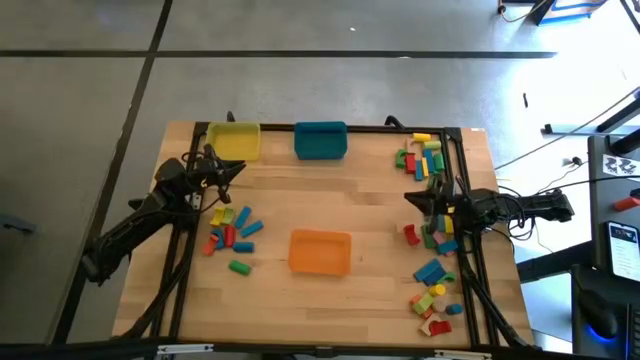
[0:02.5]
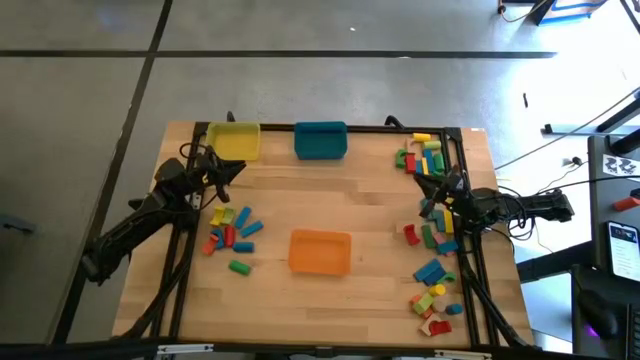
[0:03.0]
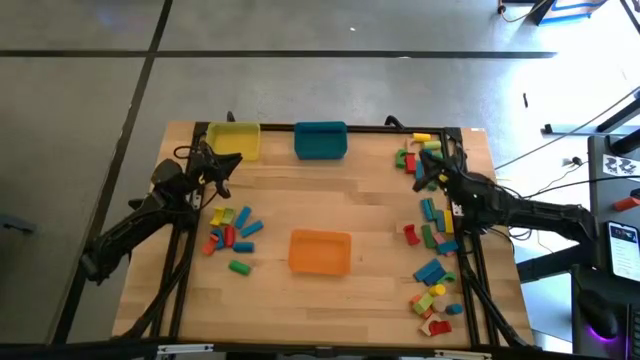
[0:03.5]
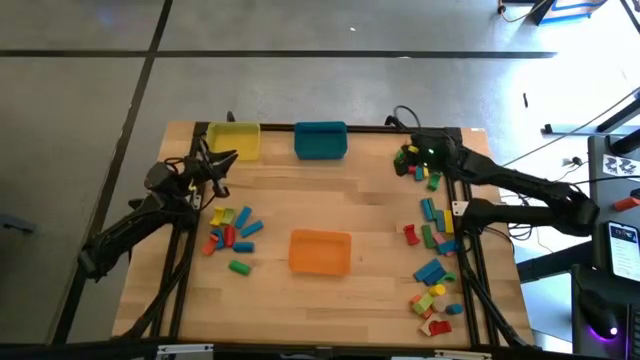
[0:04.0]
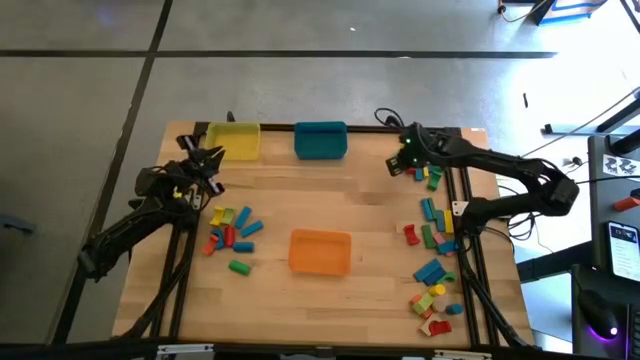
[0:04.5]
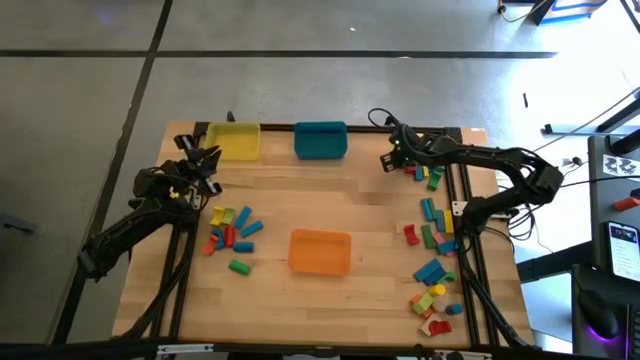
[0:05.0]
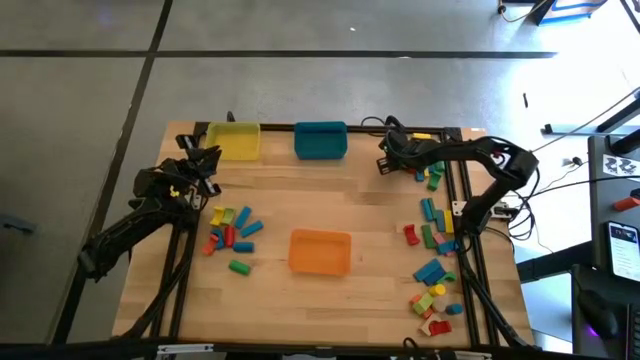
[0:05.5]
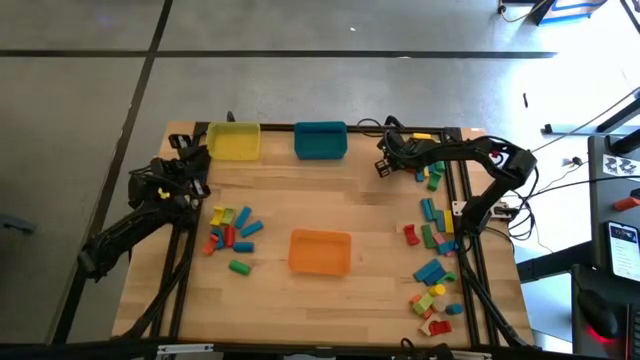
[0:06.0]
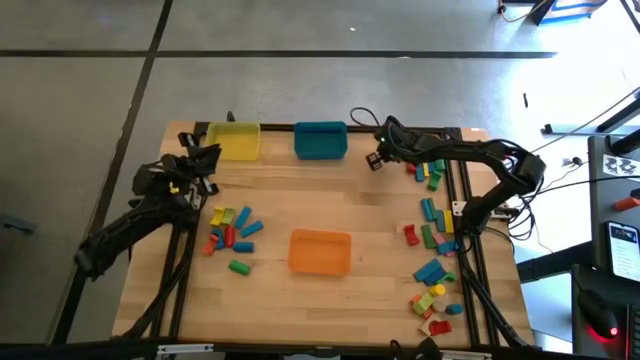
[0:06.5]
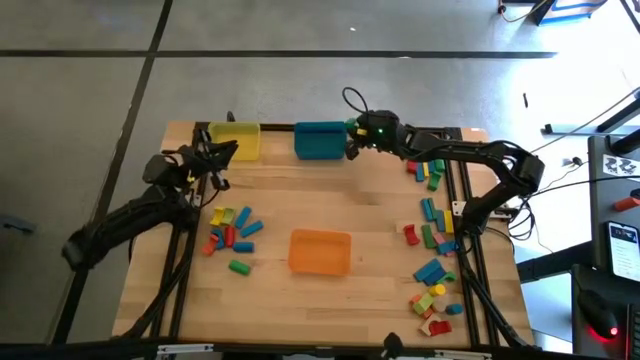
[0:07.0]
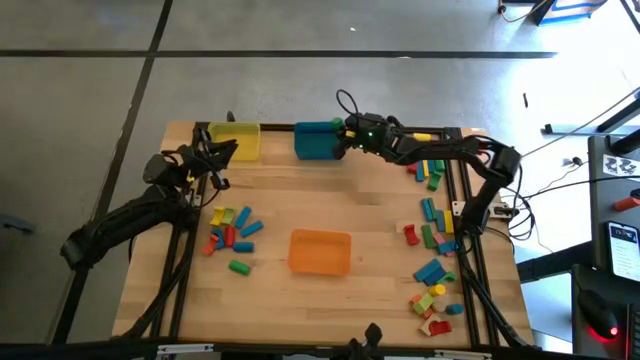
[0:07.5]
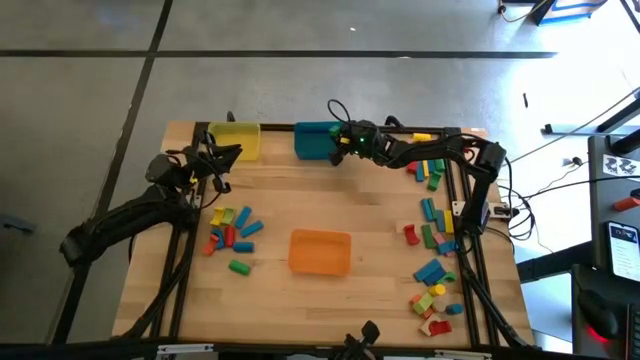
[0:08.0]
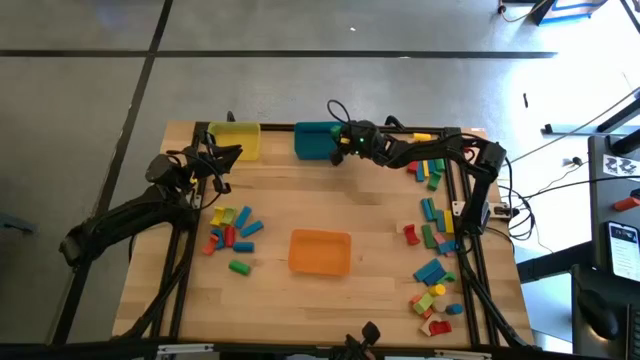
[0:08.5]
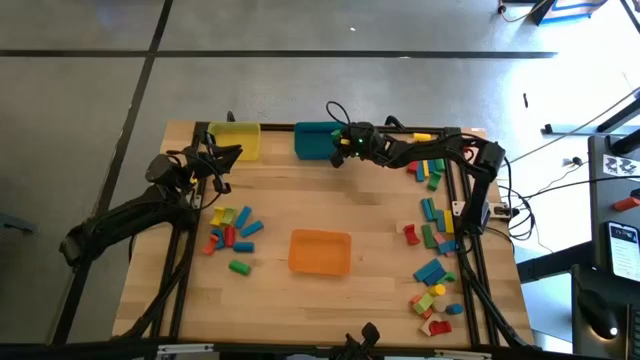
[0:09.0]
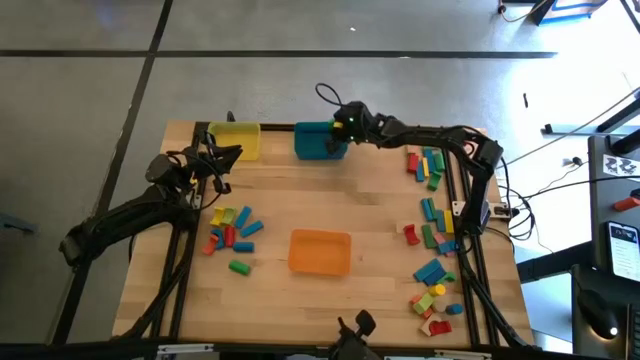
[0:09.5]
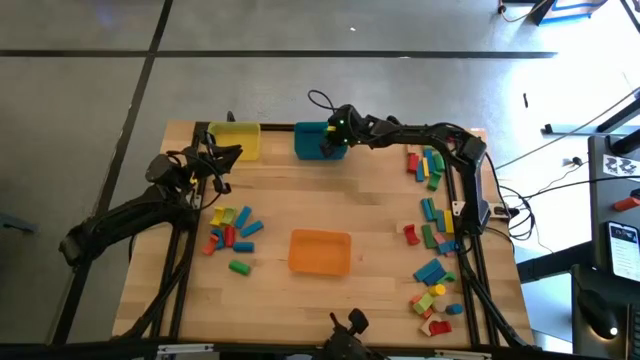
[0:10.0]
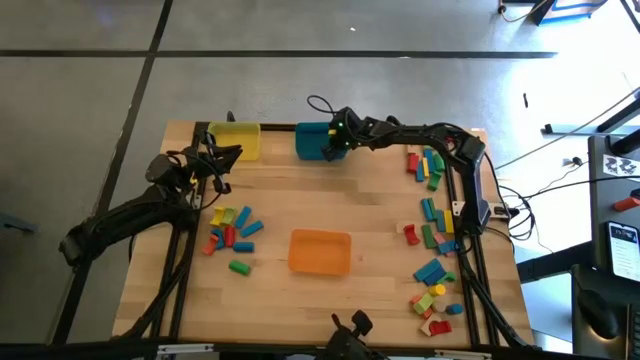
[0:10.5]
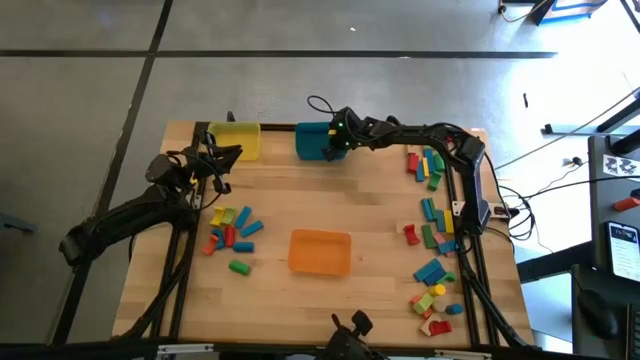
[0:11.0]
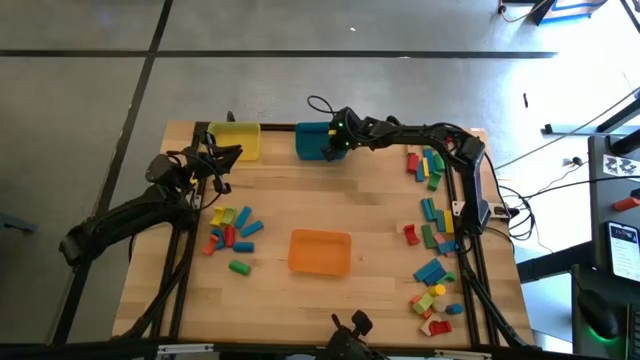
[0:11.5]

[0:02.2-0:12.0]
Task: Sort blocks by size
Put the green arch block into the blue bin

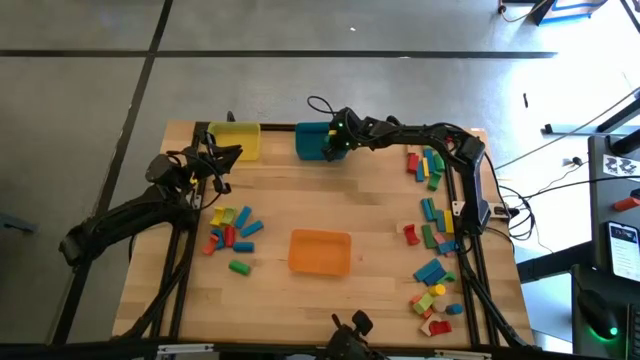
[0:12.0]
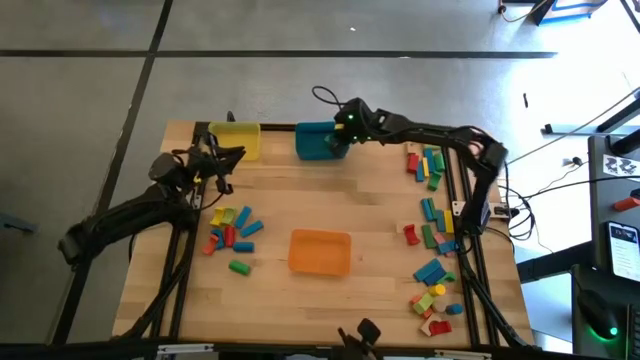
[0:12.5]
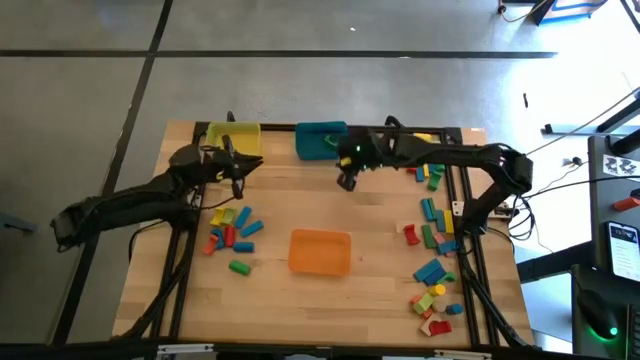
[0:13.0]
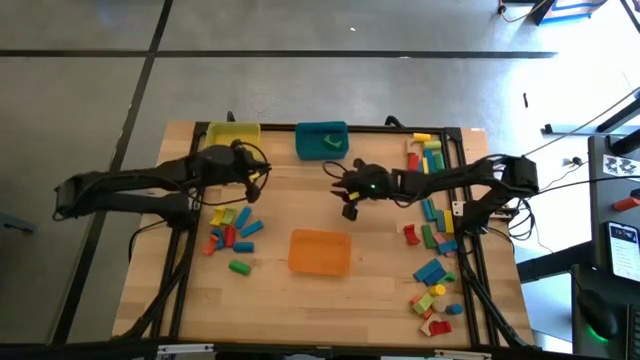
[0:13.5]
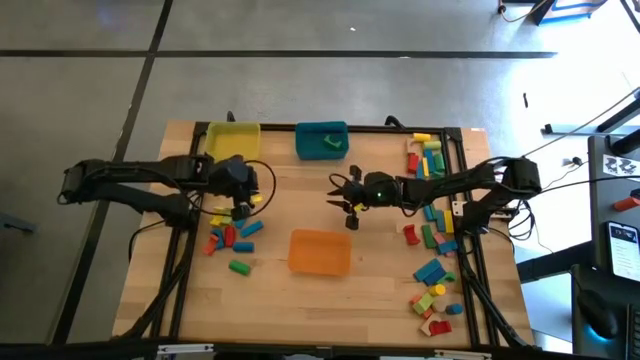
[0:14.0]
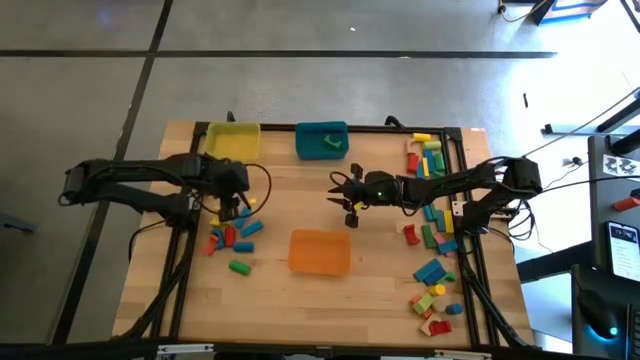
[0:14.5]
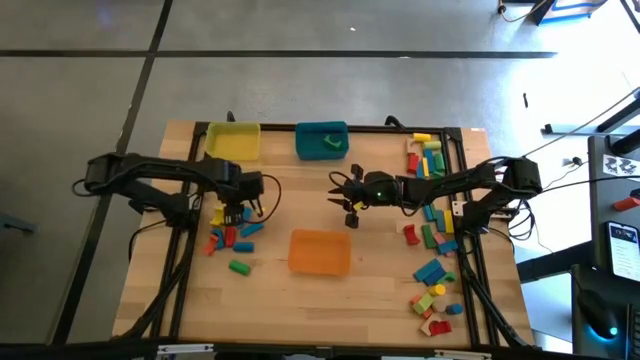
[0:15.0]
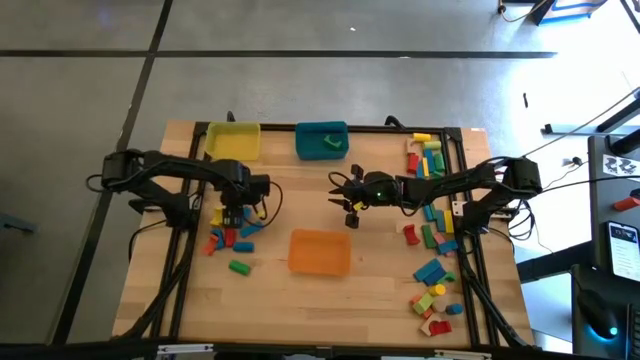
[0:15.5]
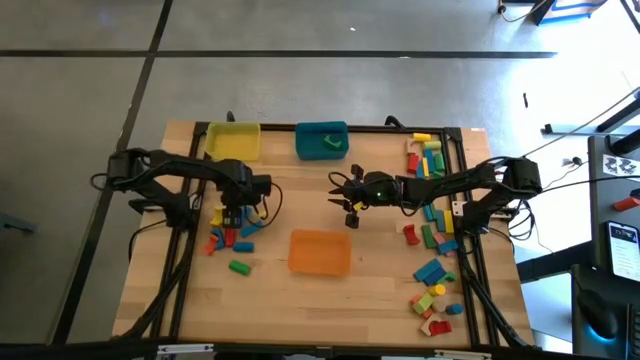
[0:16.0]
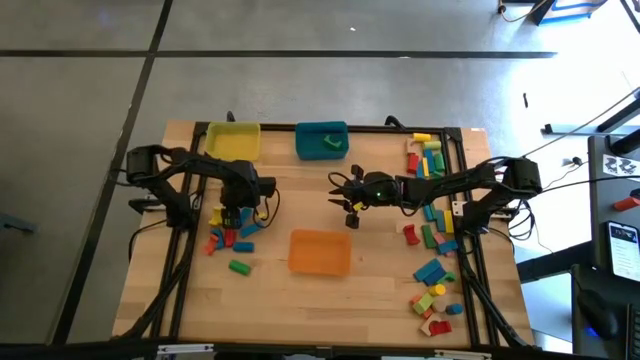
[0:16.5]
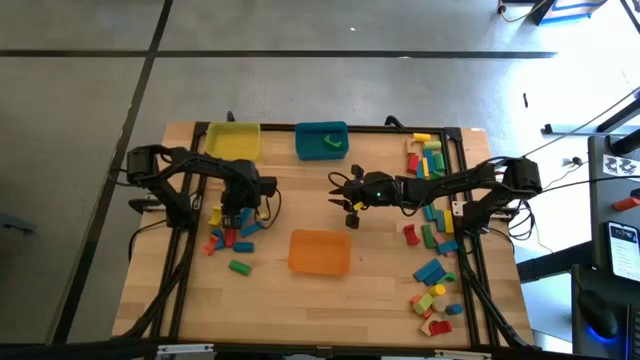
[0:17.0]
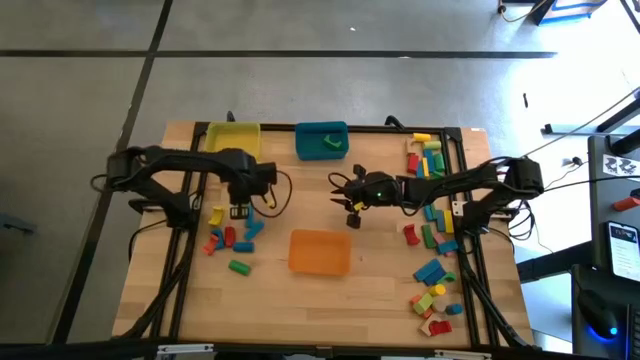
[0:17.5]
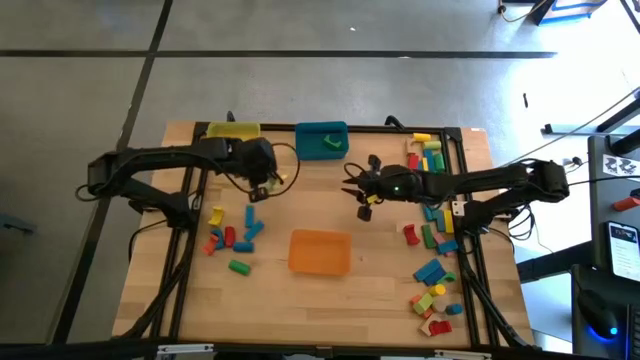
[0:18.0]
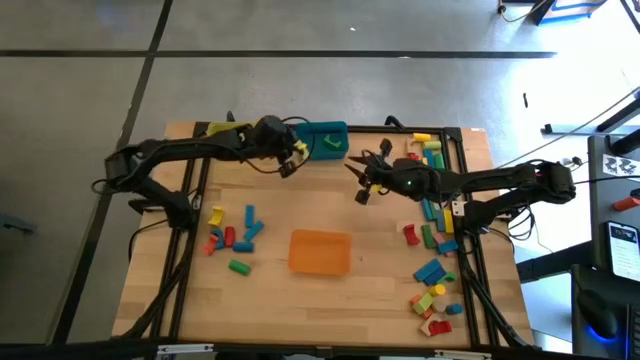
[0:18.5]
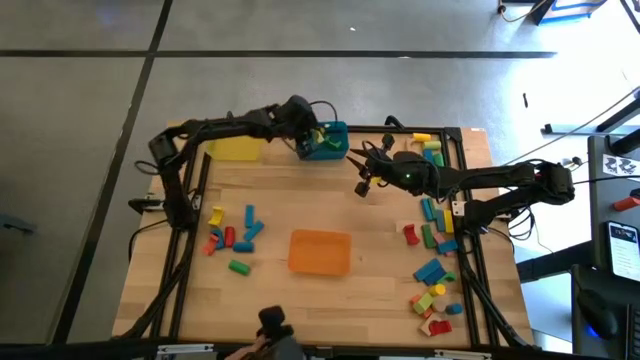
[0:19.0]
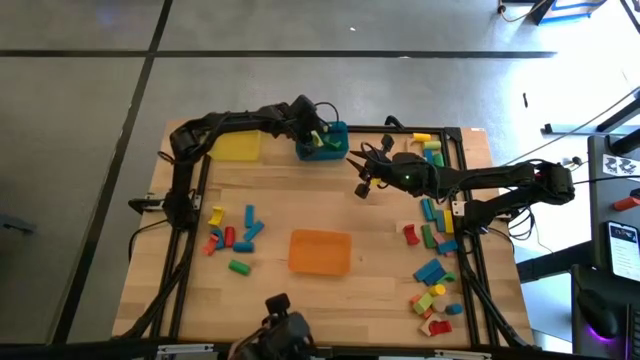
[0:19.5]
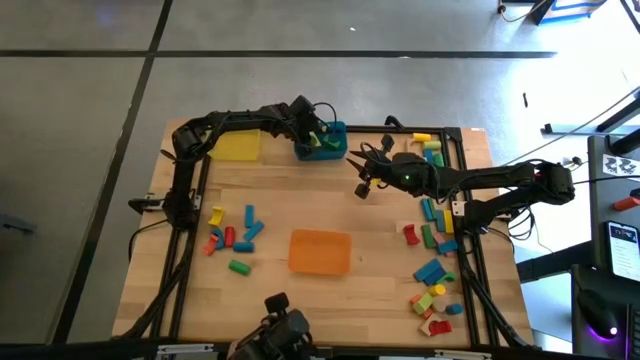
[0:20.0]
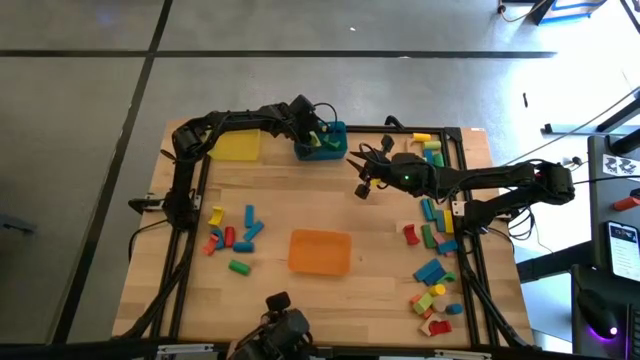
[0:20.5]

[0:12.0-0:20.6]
Put the light green arch block into the blue bin

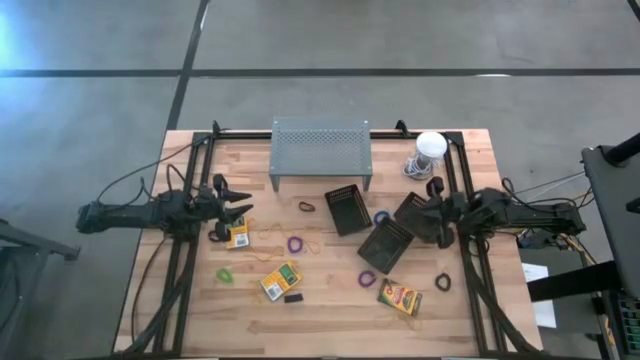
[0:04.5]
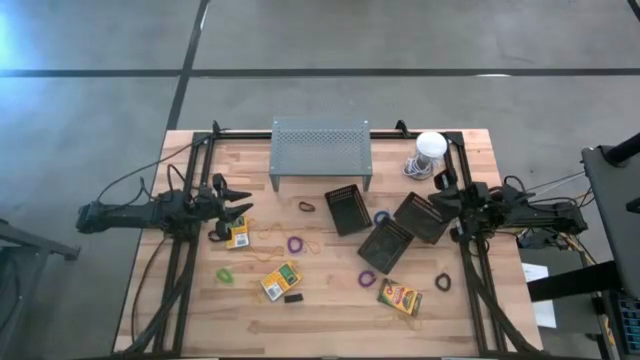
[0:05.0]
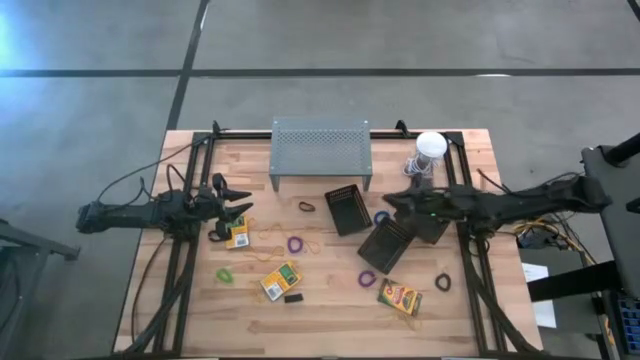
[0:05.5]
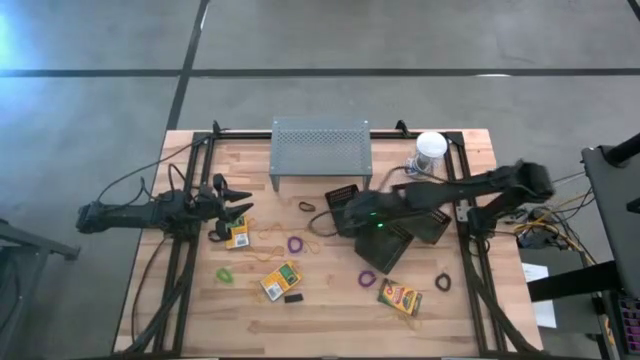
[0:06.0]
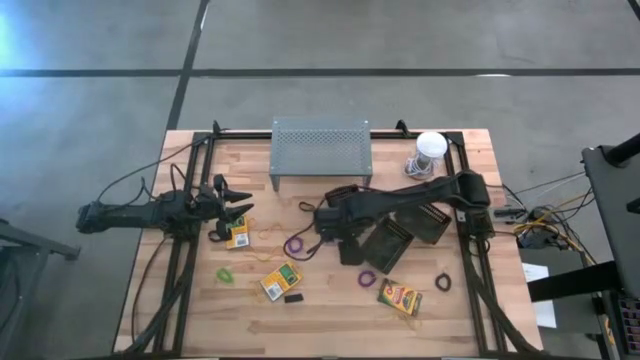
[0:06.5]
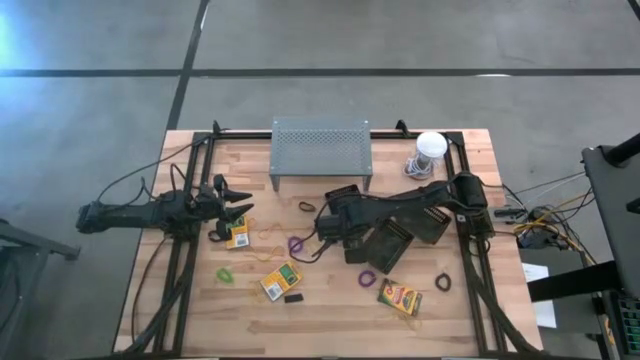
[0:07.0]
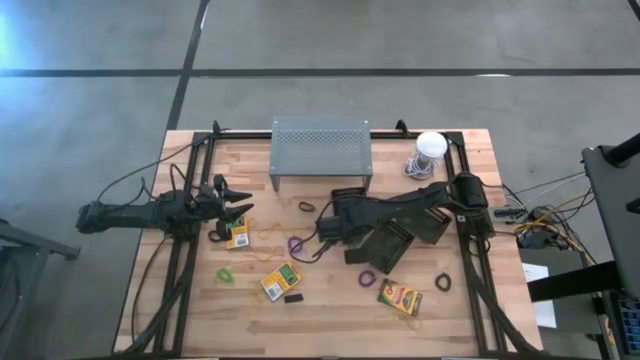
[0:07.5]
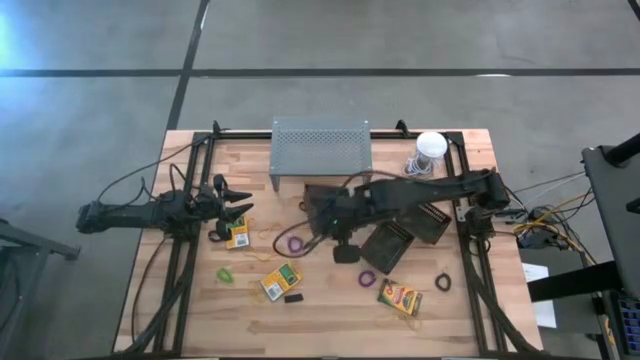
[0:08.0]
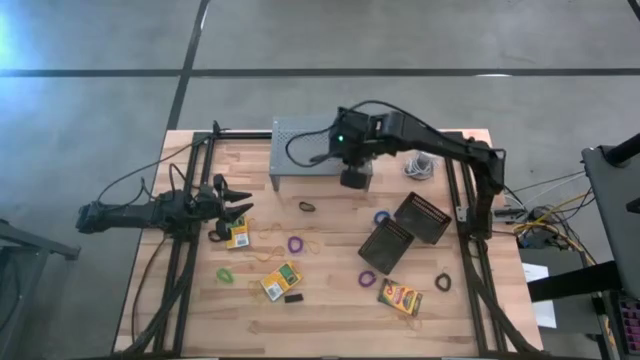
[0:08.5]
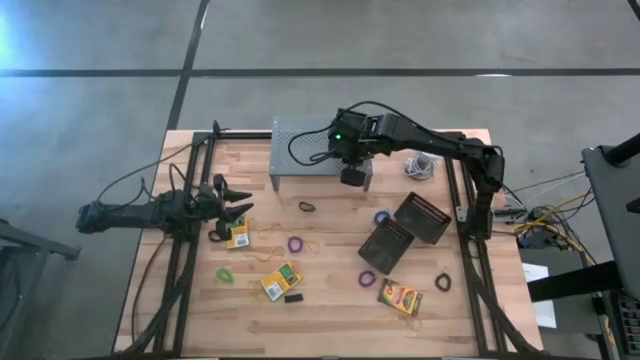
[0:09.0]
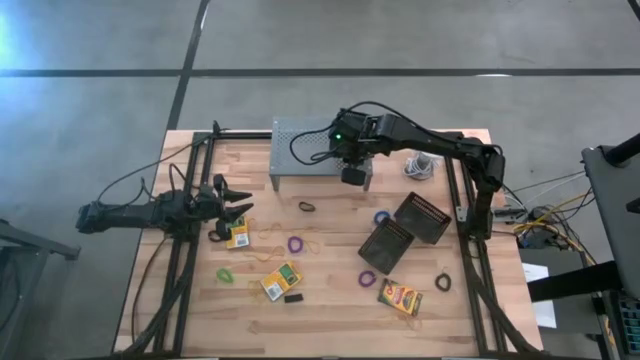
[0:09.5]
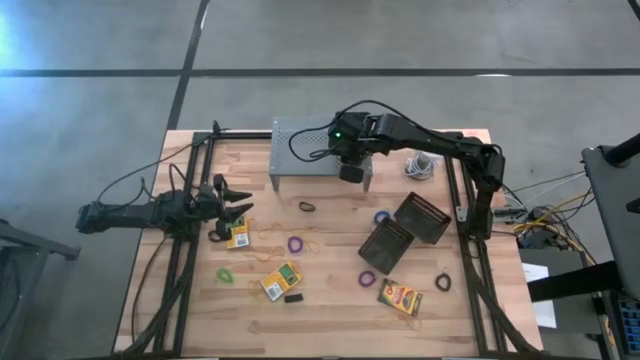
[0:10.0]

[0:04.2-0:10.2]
Task: Pick & Place Office Desk Supplies
Put the left black bin on the shelf
